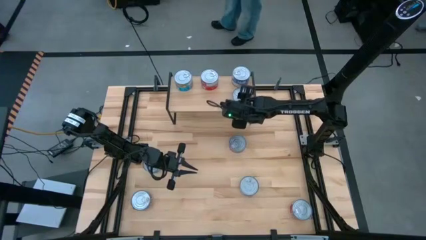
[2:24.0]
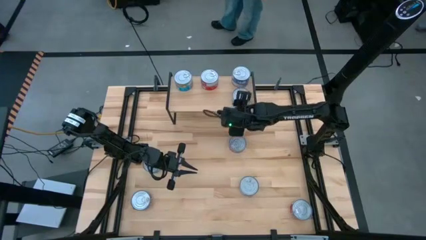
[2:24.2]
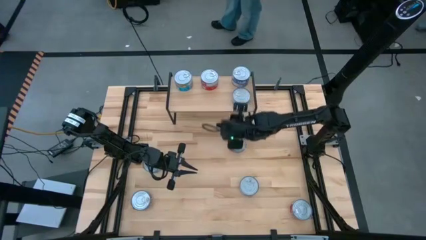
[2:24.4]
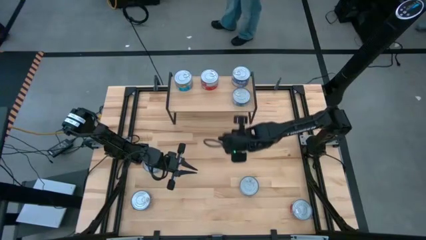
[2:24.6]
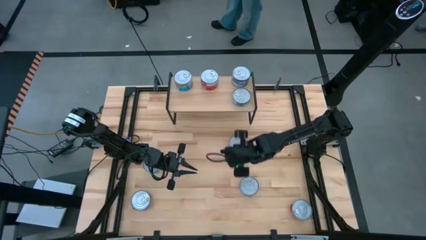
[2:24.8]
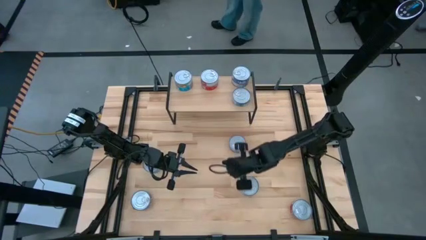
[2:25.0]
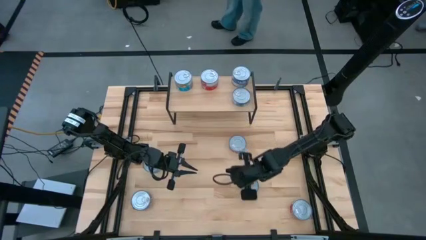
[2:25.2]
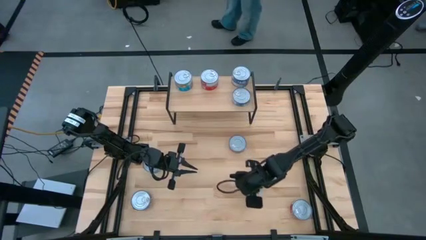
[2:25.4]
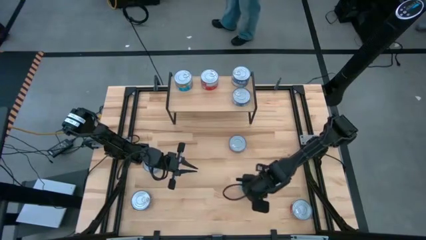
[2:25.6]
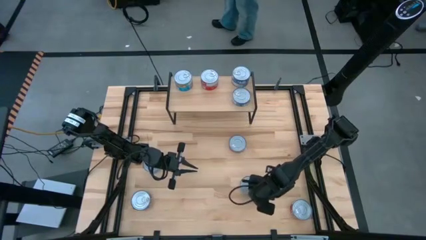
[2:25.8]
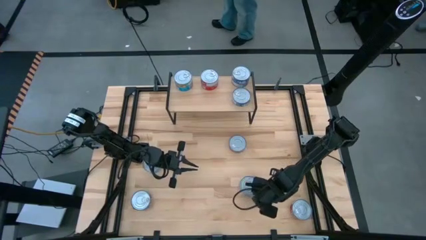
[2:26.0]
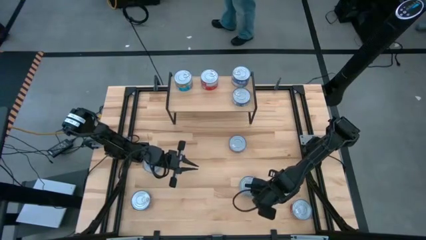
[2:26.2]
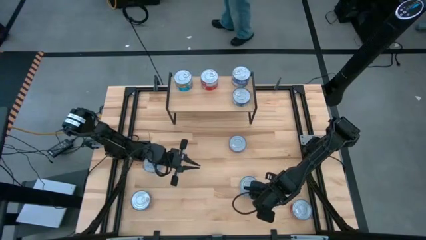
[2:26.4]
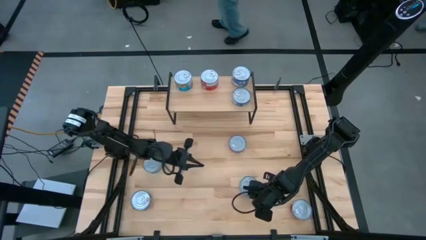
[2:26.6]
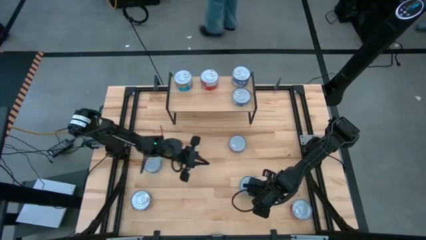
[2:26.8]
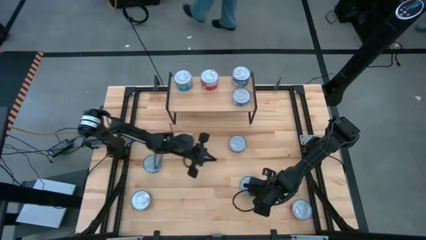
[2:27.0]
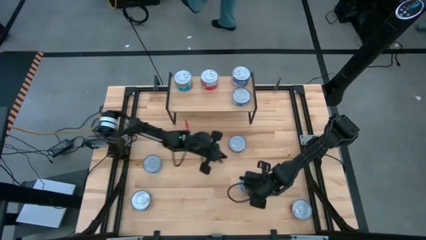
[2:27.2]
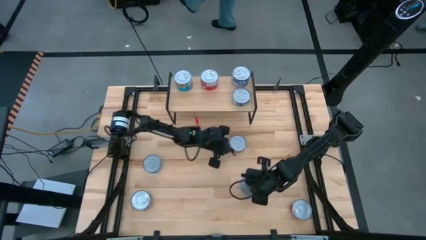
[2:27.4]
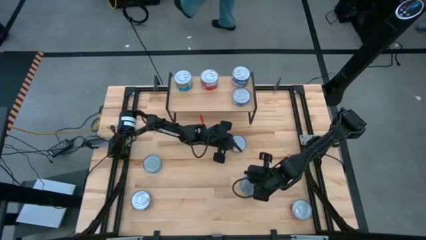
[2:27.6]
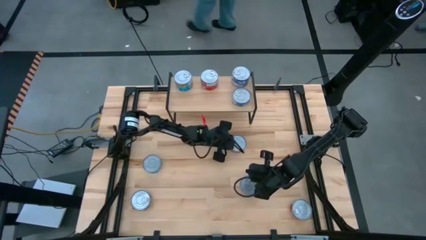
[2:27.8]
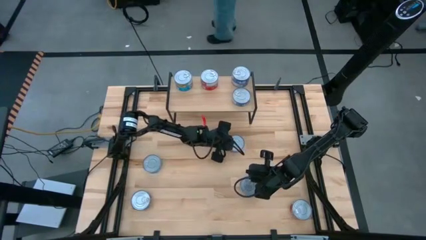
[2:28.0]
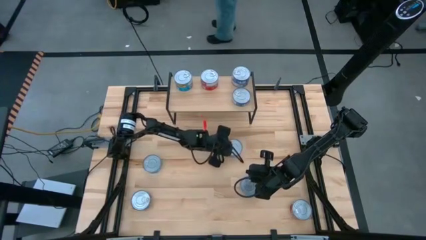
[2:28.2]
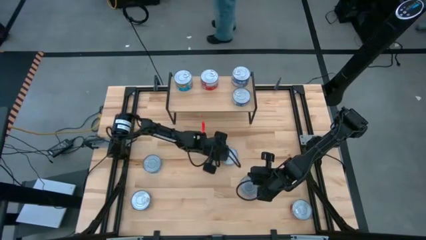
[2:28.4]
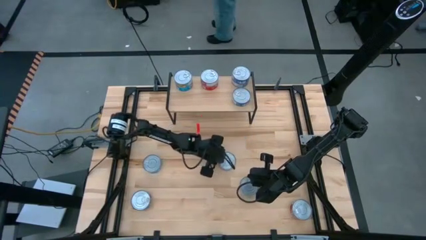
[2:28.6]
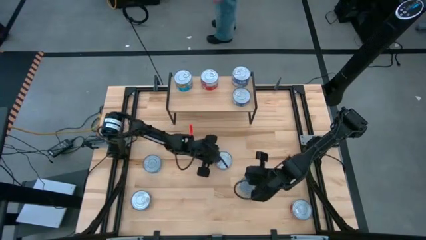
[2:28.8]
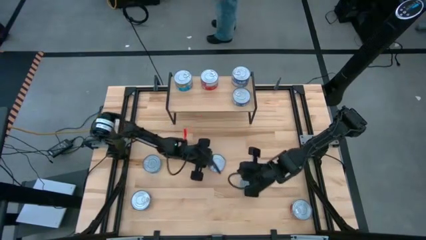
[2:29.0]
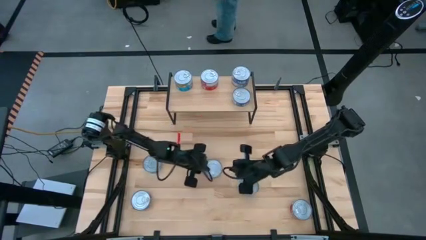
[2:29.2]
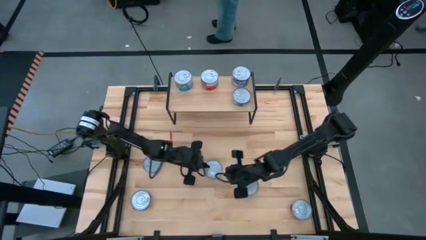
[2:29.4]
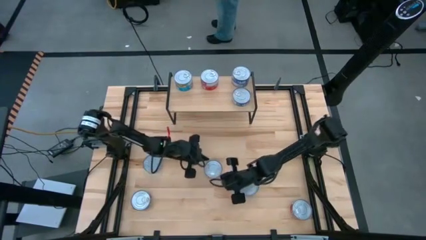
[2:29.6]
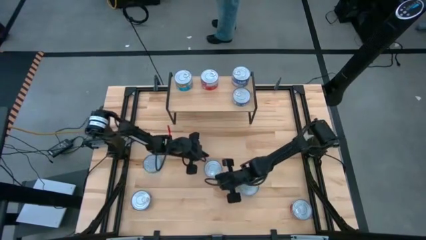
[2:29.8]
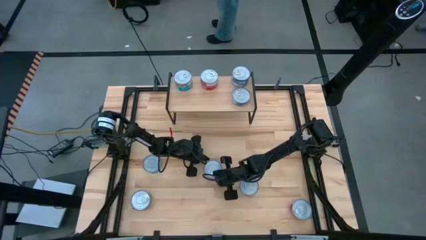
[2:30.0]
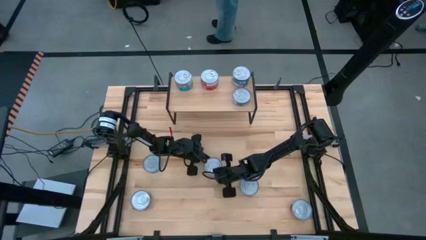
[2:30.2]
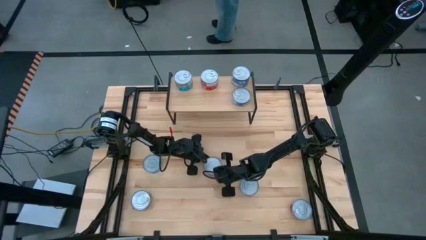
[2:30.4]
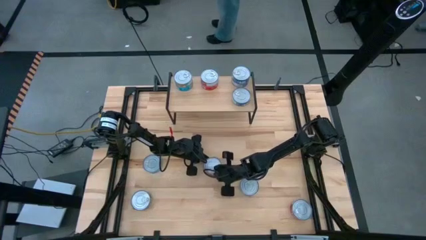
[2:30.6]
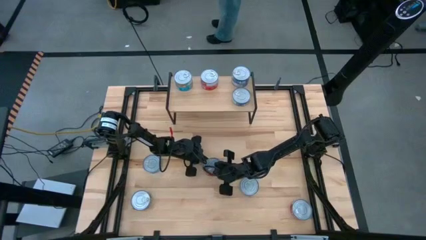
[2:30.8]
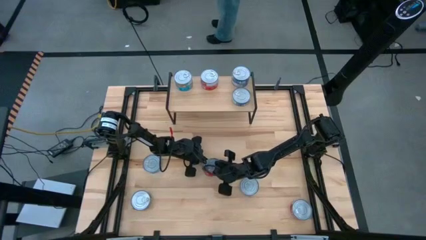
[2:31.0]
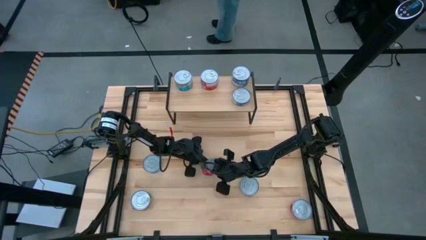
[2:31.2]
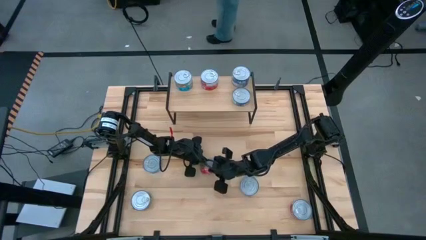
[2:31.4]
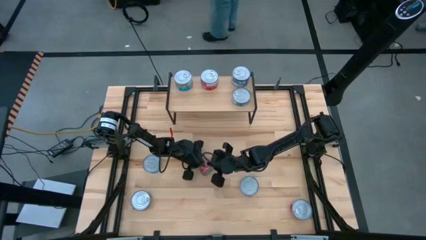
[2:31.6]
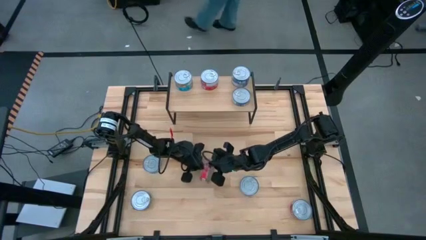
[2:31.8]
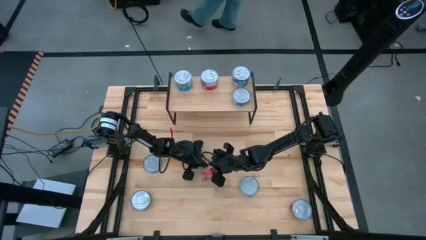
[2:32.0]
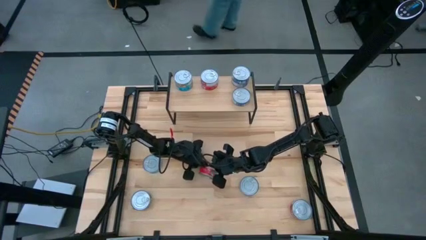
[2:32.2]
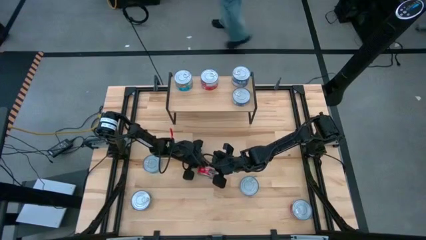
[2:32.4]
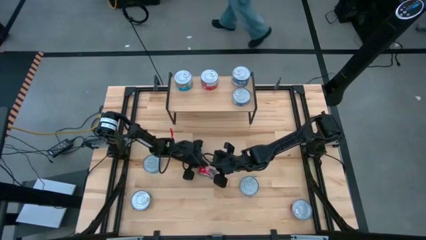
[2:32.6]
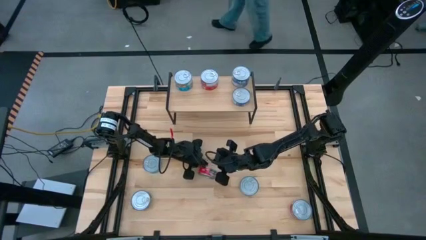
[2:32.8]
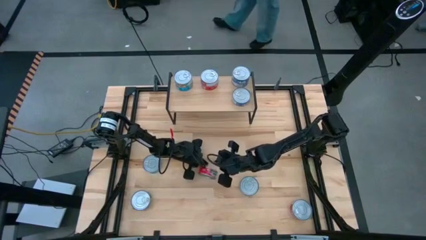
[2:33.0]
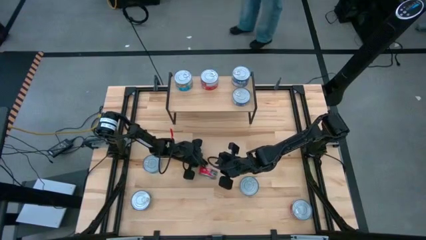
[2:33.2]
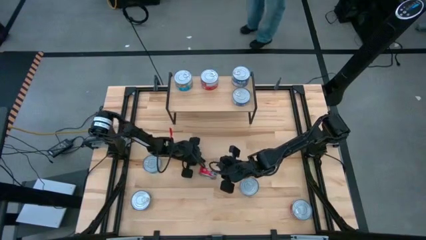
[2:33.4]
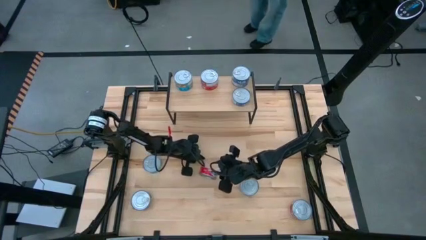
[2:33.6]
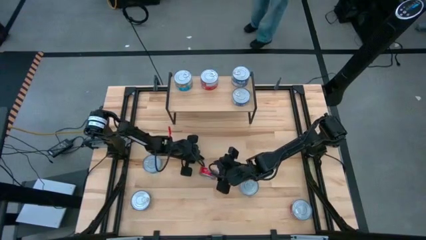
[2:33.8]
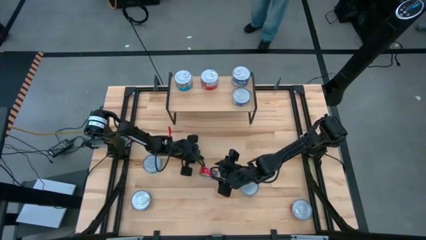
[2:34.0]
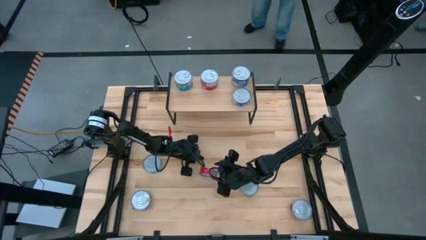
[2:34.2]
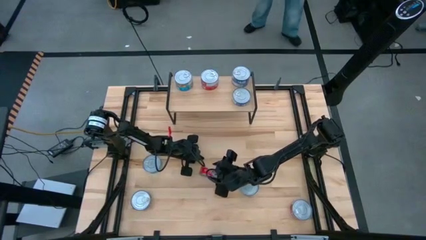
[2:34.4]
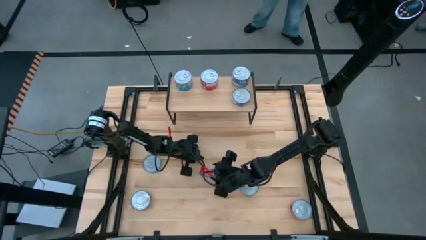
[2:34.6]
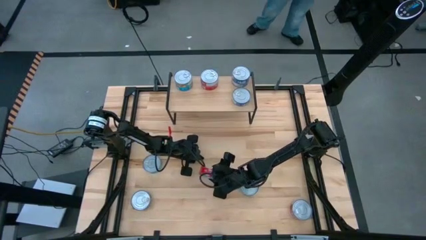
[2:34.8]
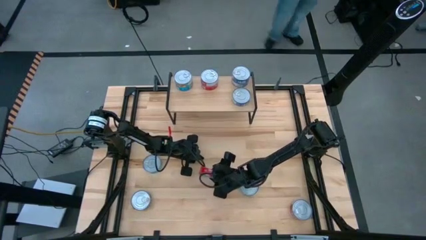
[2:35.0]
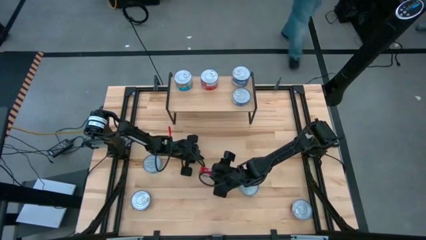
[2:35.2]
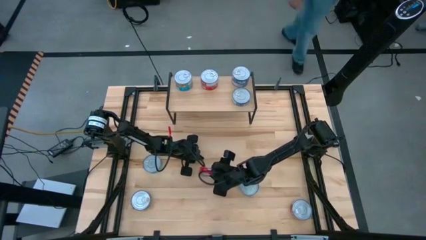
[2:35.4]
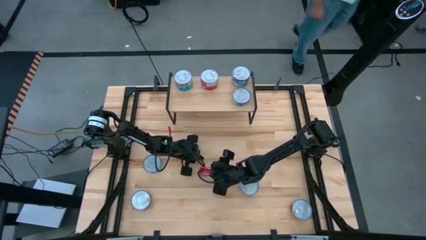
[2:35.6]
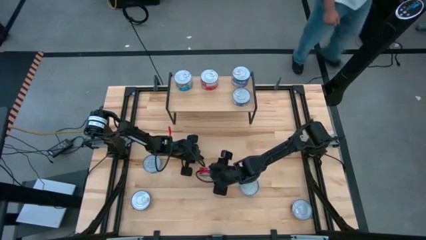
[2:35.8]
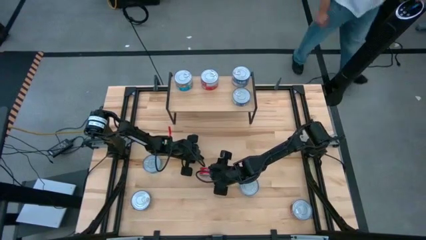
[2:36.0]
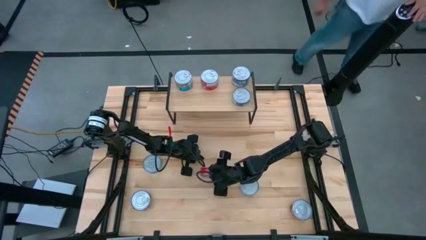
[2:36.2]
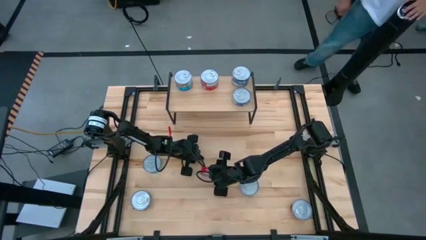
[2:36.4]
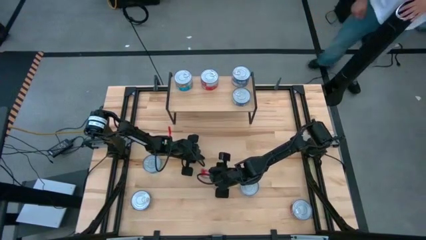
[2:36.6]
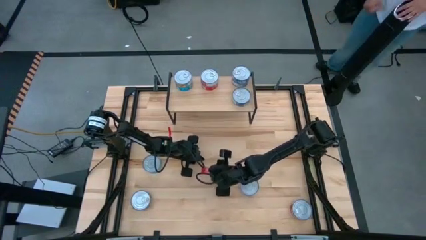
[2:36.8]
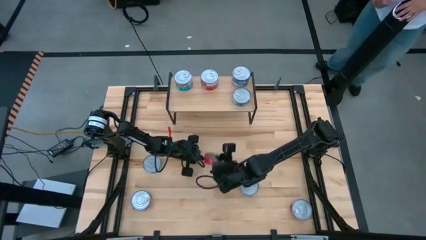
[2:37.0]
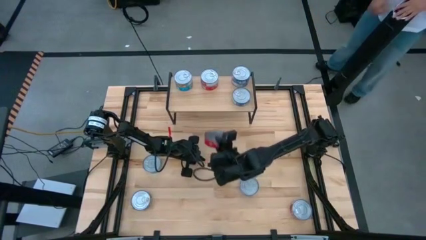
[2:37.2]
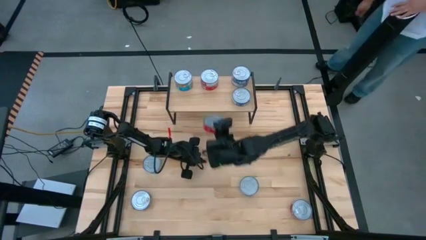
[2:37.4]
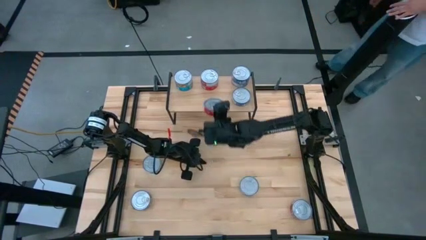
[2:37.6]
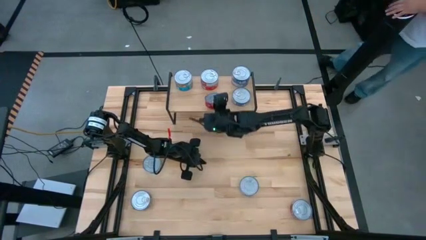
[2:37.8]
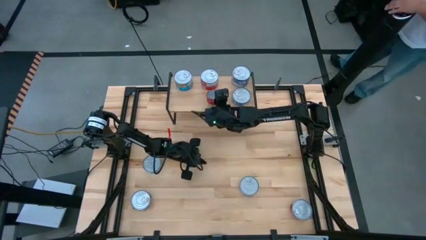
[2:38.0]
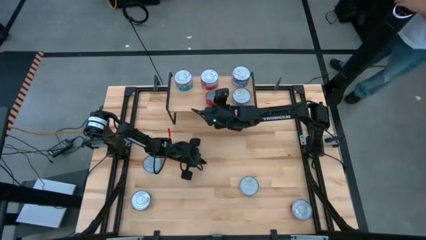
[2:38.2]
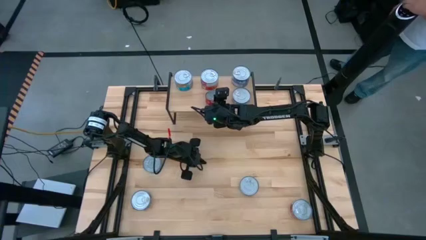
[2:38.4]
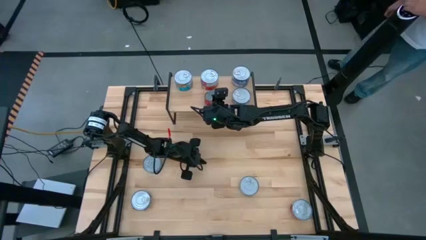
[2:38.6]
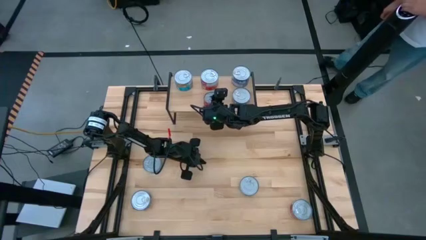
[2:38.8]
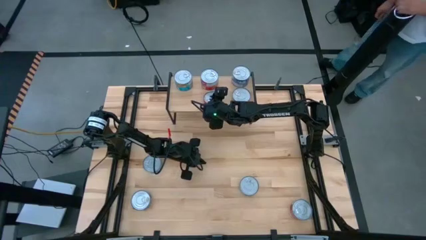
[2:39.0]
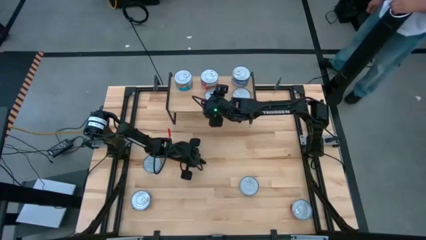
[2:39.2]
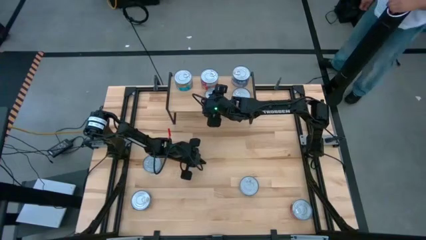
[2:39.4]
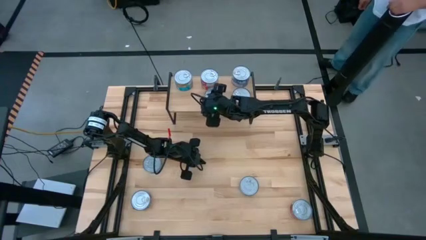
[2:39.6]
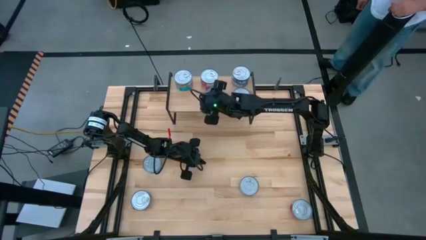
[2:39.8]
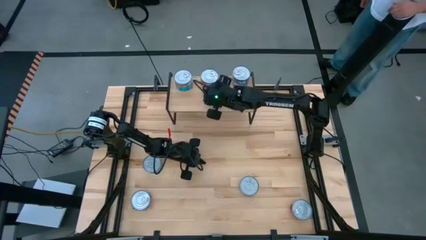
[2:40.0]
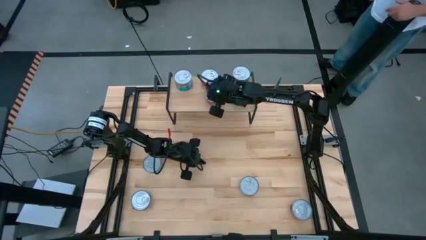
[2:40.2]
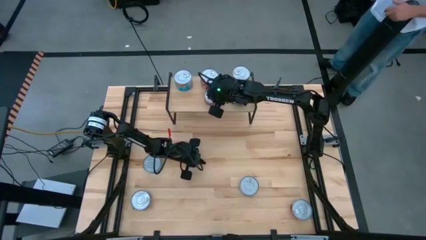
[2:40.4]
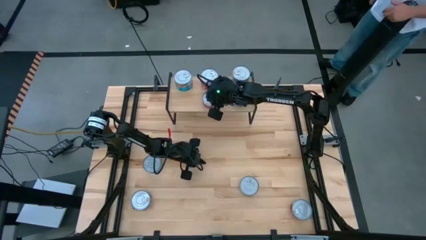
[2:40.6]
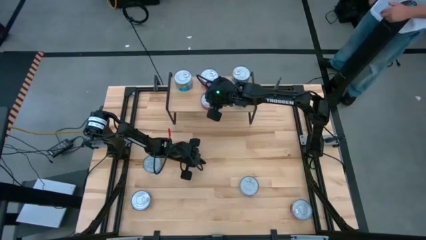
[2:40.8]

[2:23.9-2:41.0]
Task: Stack canned seafood by type on shelf
Put the red tuna can on the shelf aligned with the other red tuna can
